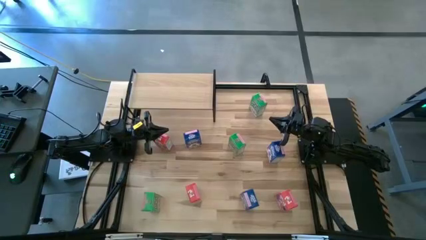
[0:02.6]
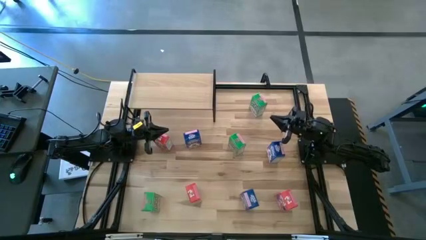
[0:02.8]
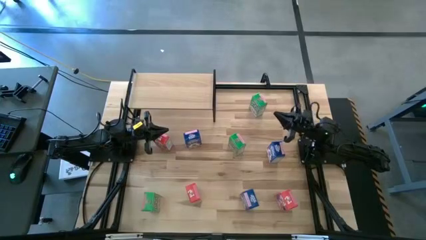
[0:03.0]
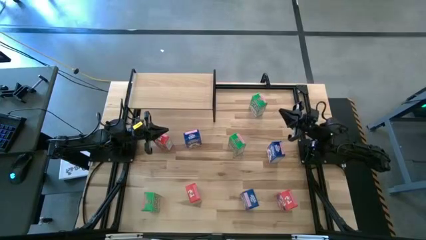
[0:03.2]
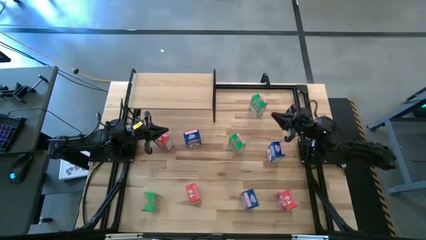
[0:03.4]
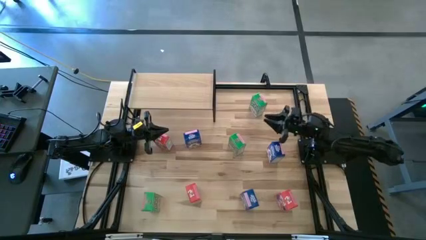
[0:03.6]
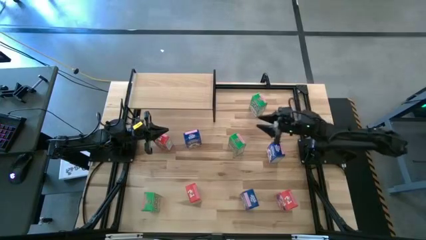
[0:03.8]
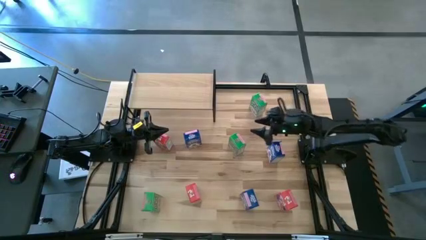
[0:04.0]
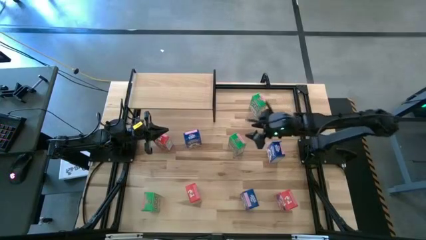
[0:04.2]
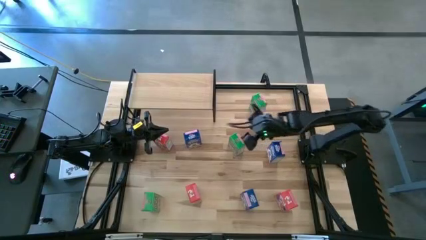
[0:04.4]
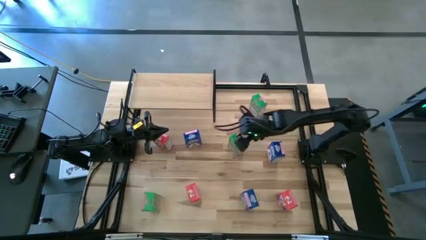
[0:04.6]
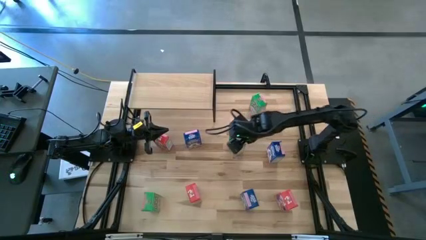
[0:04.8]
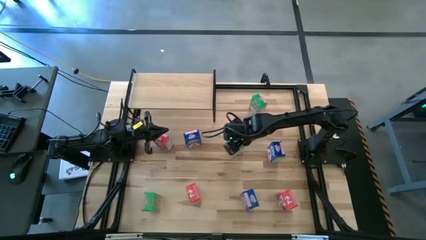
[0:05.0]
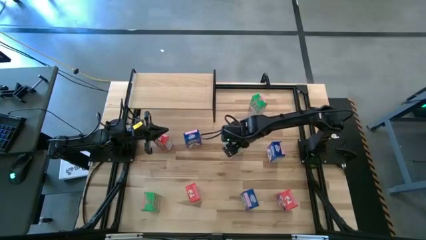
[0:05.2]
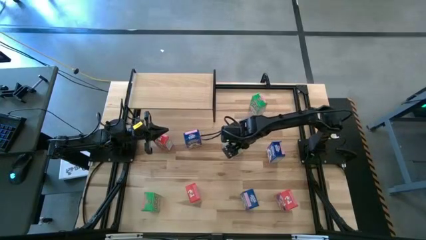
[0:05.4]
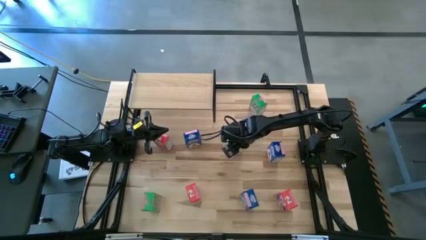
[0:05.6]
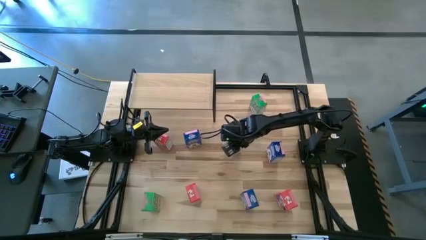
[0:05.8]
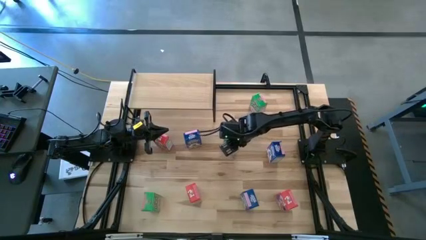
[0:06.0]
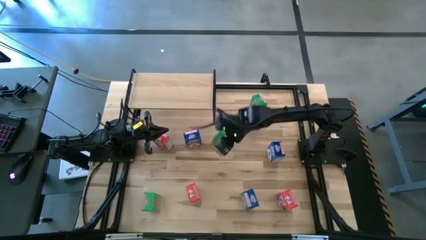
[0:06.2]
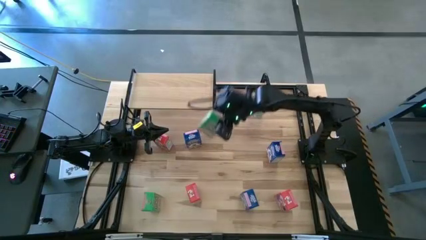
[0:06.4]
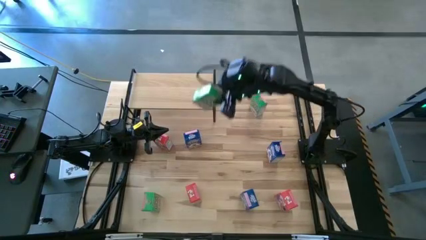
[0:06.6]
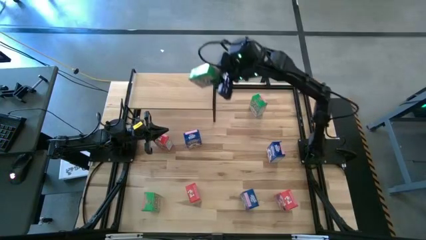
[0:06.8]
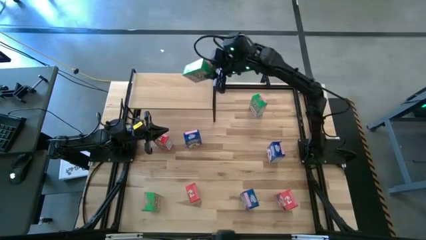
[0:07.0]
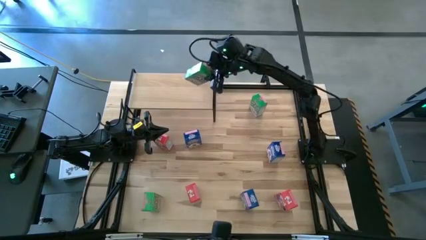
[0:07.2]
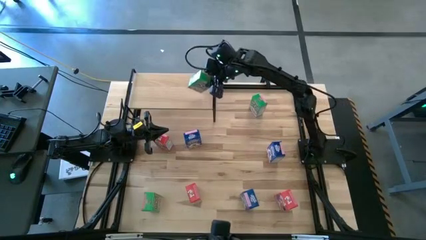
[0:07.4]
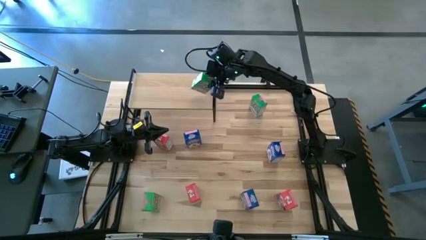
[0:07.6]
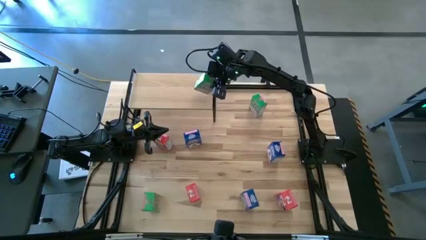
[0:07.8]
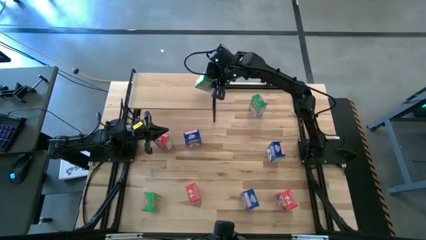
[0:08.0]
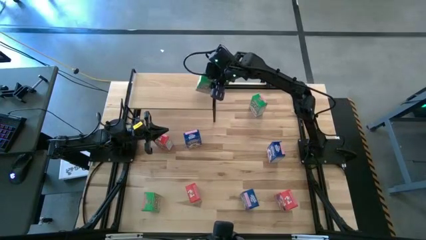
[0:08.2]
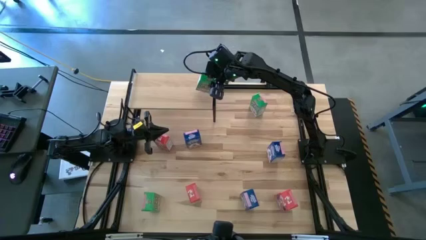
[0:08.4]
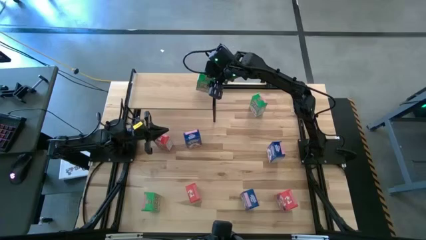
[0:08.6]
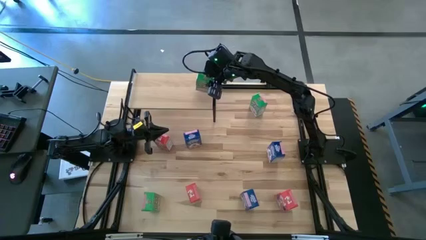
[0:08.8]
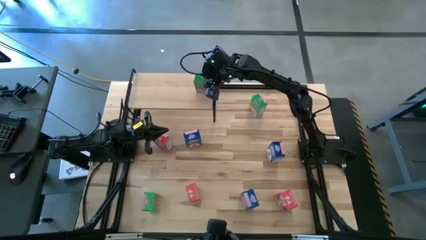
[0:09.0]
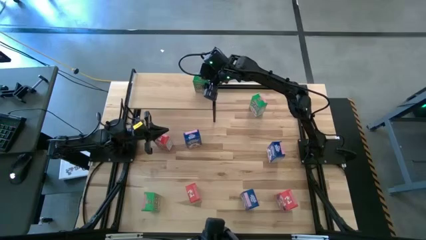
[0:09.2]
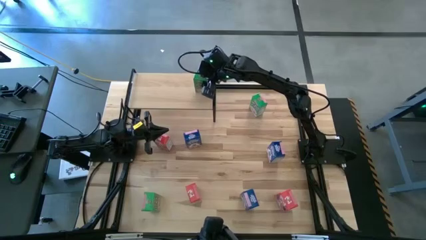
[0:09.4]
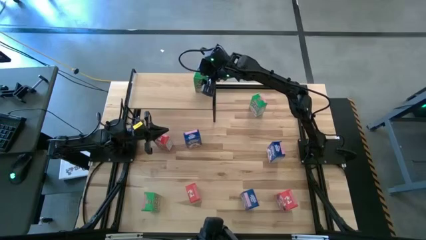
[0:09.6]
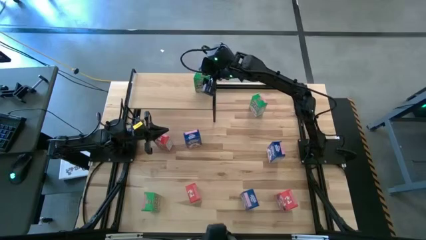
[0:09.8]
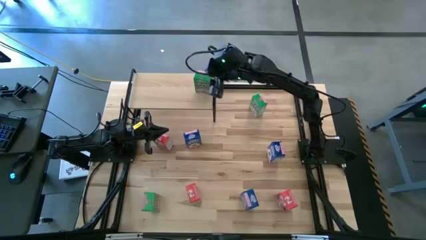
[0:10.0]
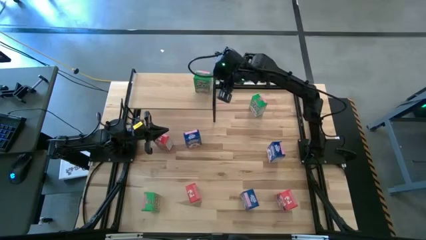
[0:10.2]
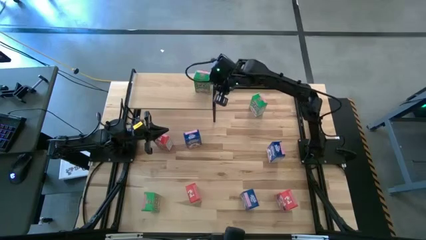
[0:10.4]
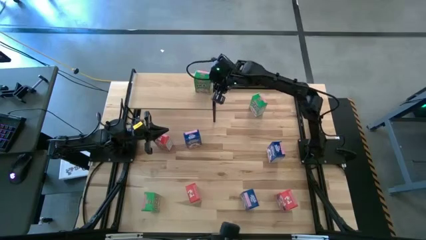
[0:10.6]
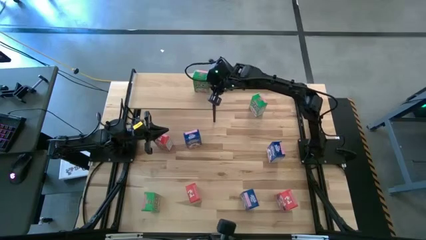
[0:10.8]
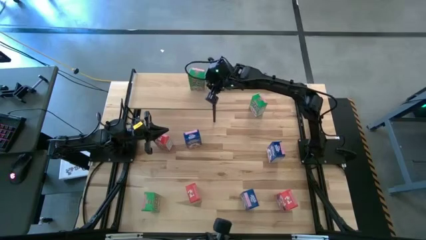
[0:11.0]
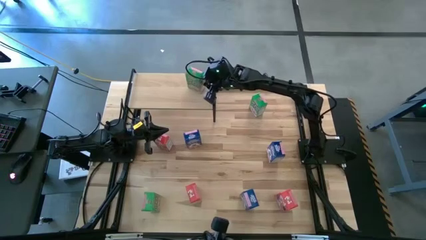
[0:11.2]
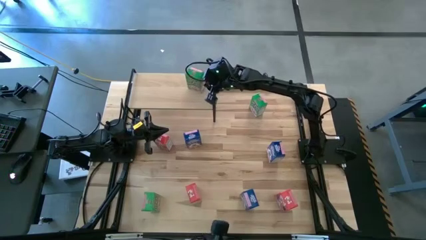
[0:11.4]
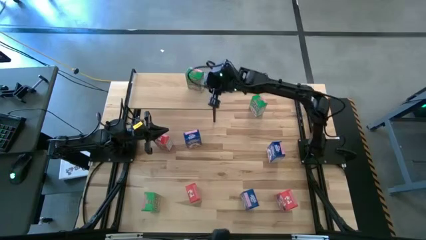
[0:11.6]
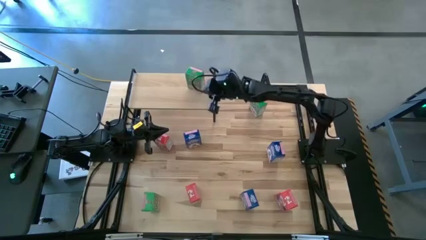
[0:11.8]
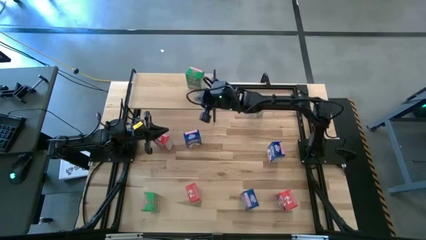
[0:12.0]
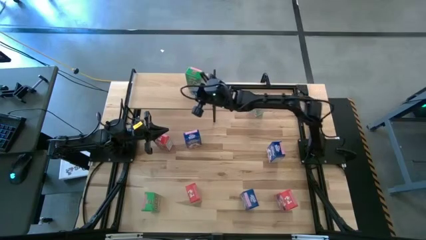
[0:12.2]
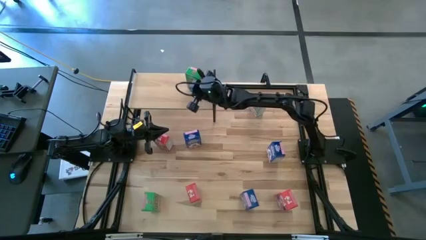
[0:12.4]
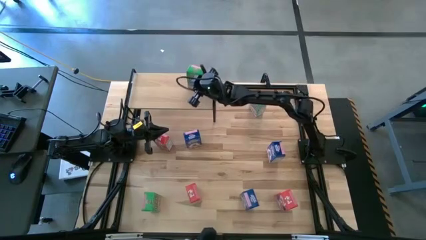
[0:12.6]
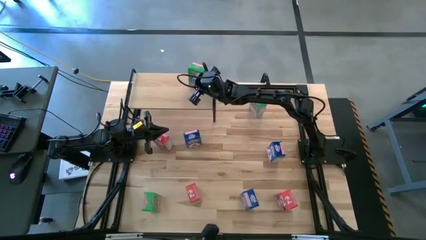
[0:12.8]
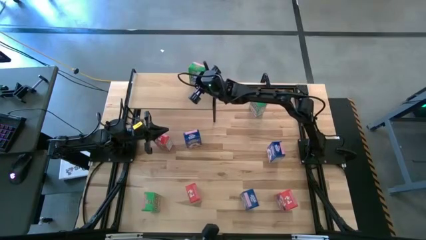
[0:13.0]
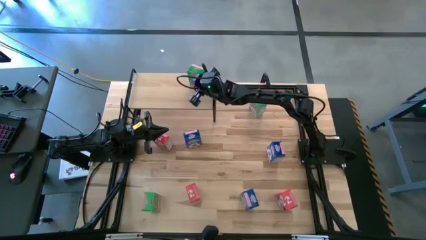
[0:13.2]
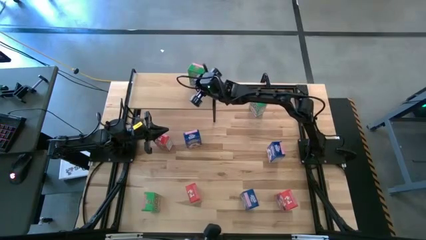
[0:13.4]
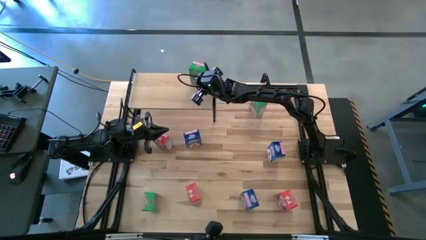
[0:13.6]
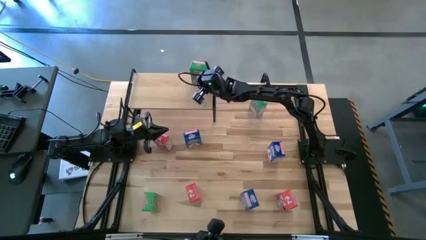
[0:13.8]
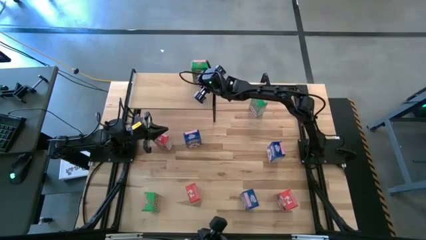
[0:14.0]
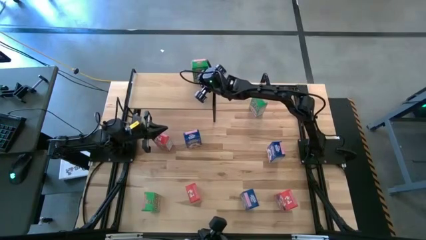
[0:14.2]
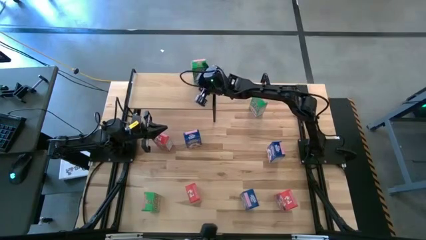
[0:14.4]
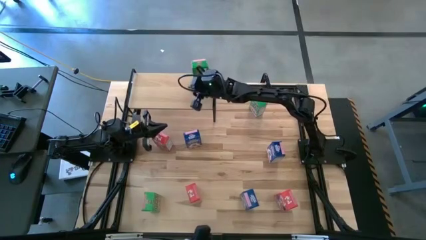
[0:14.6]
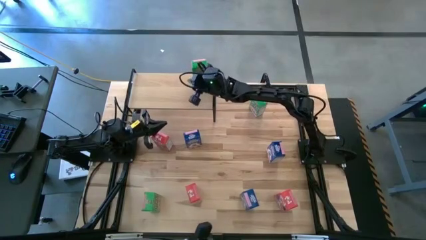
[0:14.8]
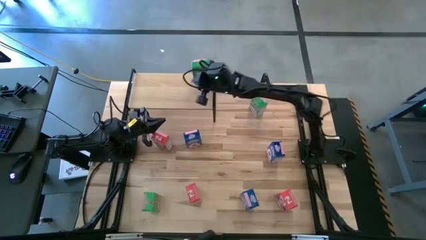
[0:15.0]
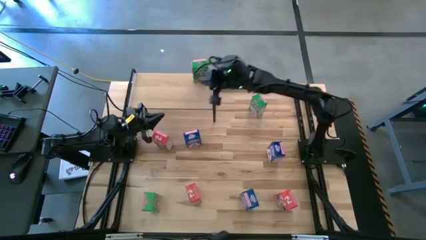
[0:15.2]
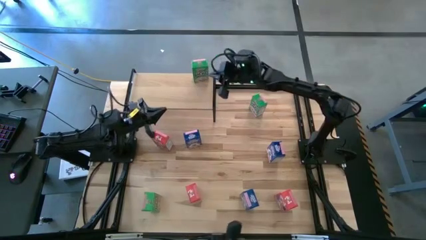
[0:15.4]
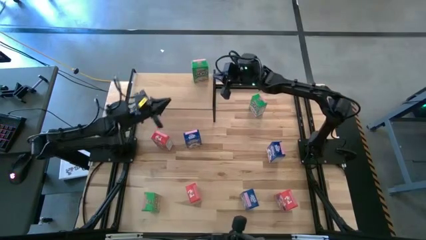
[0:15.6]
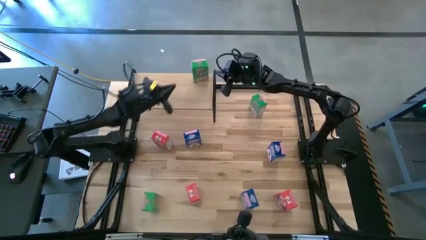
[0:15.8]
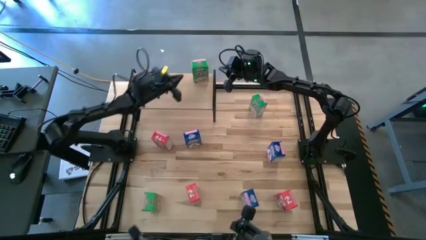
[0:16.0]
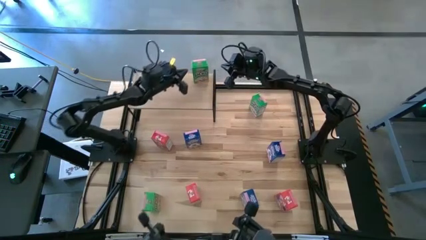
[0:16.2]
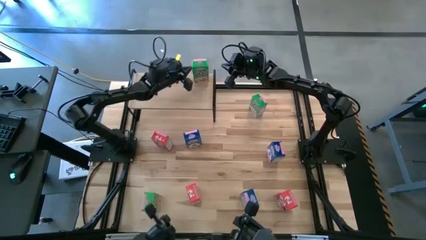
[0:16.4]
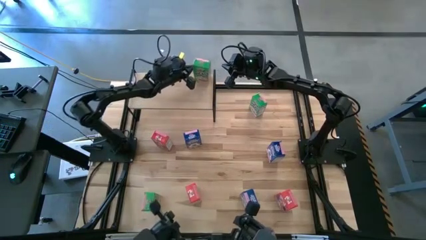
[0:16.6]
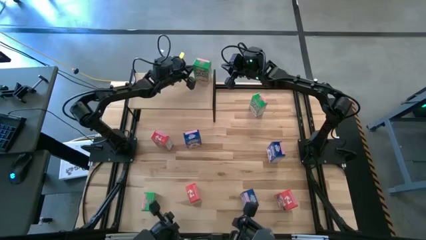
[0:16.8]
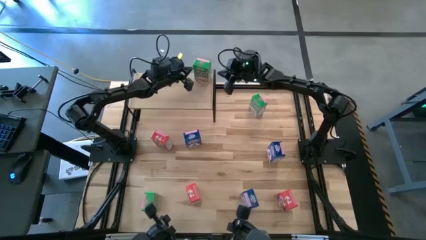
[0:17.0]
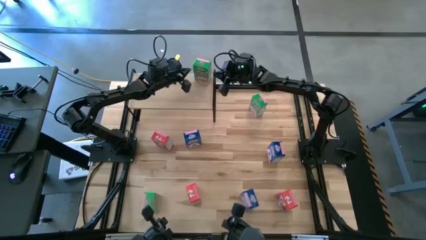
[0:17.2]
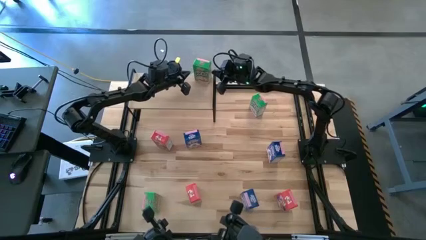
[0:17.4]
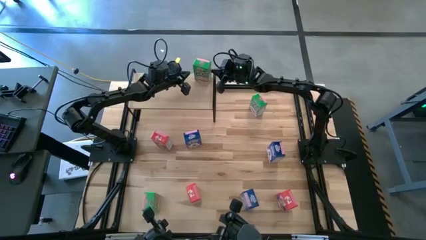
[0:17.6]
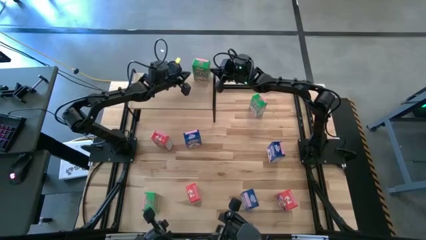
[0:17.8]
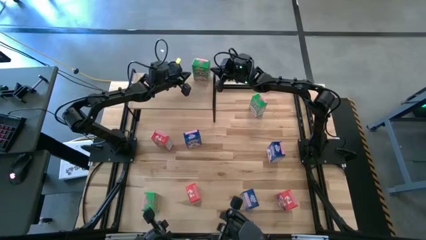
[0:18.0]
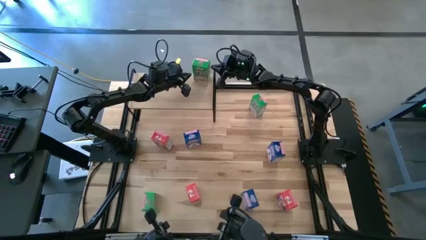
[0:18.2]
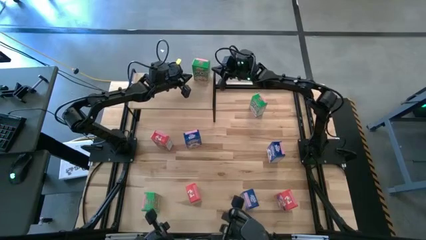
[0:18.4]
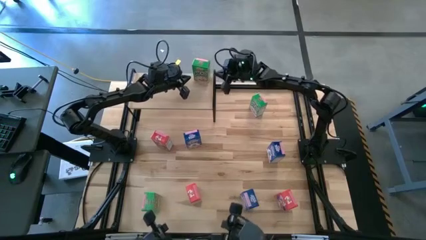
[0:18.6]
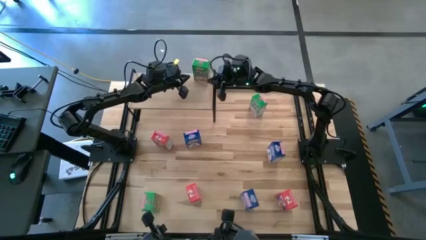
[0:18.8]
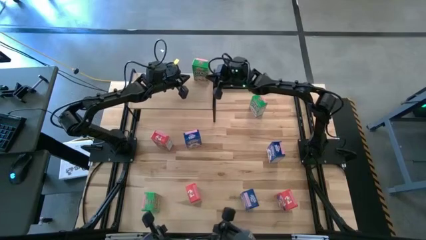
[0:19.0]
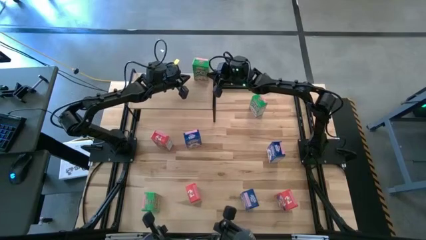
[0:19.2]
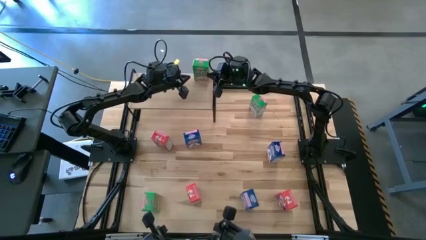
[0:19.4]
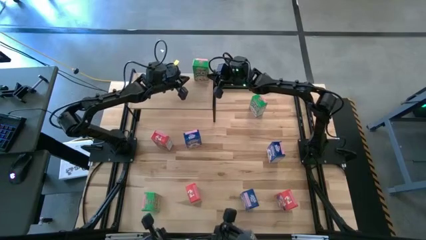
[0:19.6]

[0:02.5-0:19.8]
Task: Stack cereal on shelf
Put the middle green cereal box on the shelf
